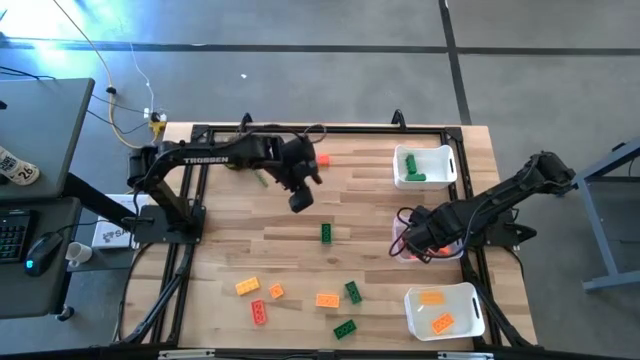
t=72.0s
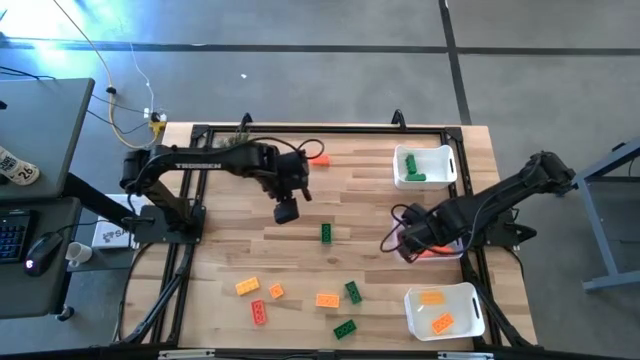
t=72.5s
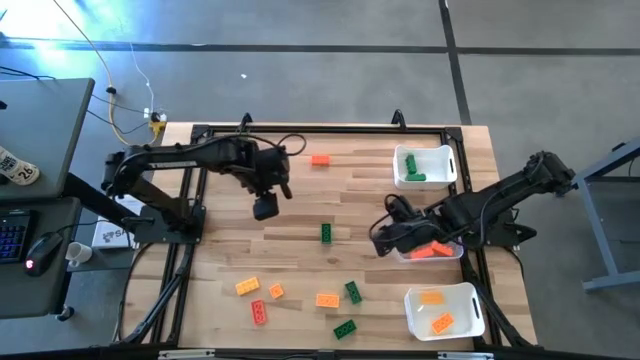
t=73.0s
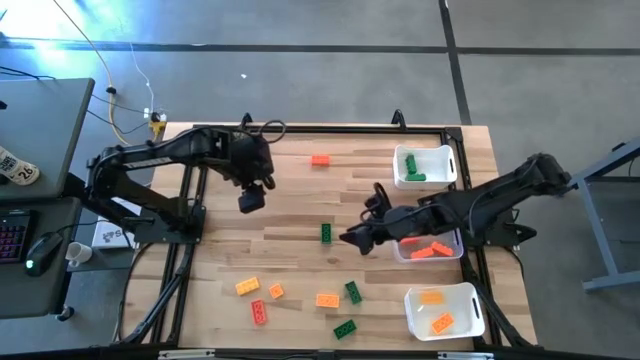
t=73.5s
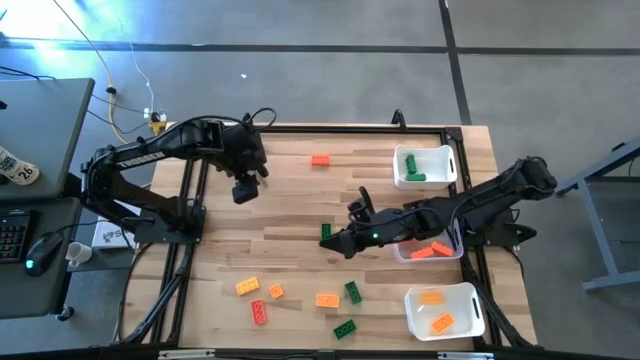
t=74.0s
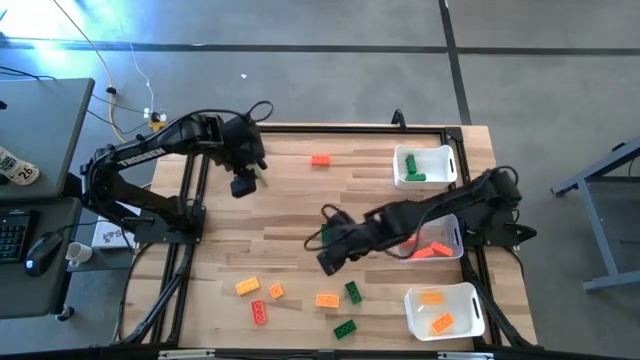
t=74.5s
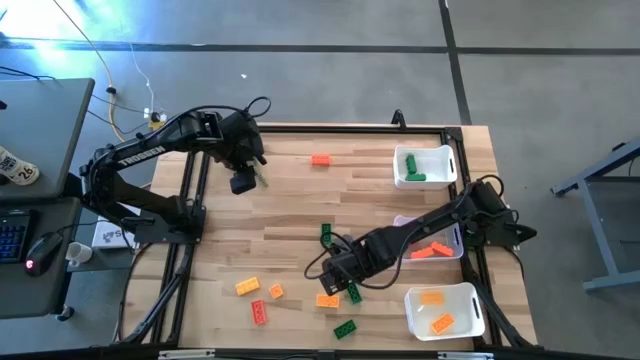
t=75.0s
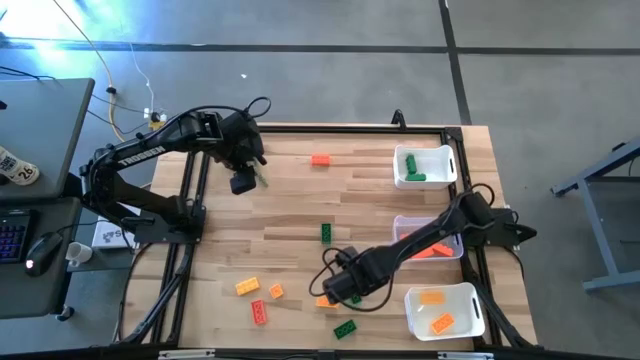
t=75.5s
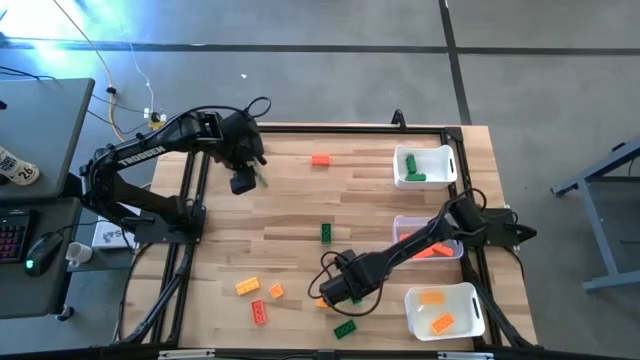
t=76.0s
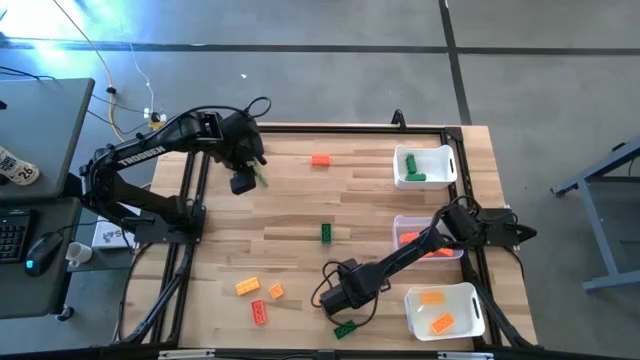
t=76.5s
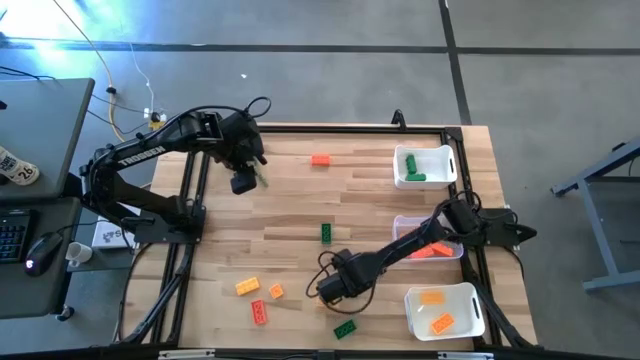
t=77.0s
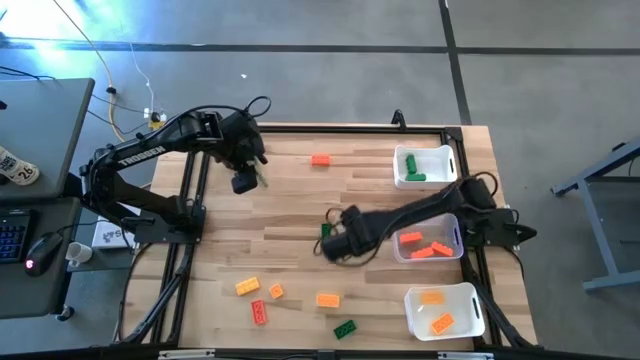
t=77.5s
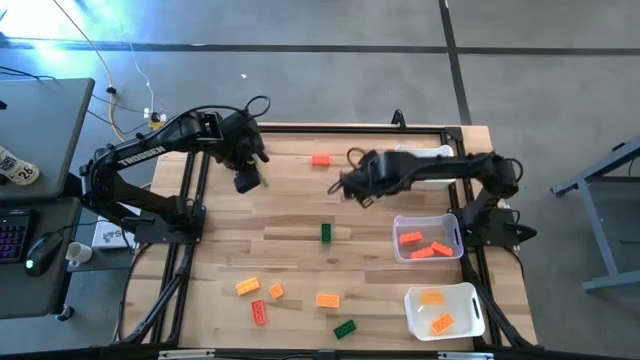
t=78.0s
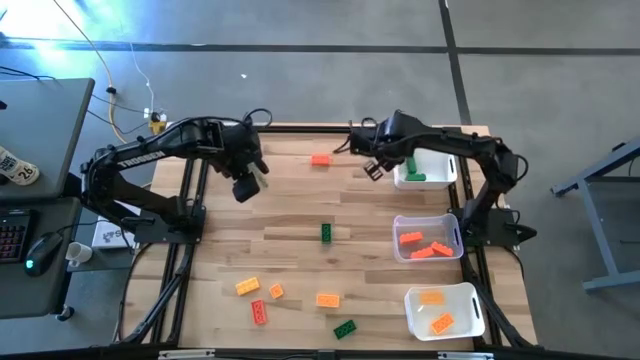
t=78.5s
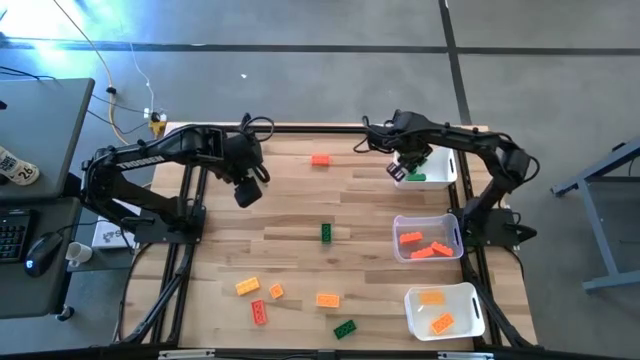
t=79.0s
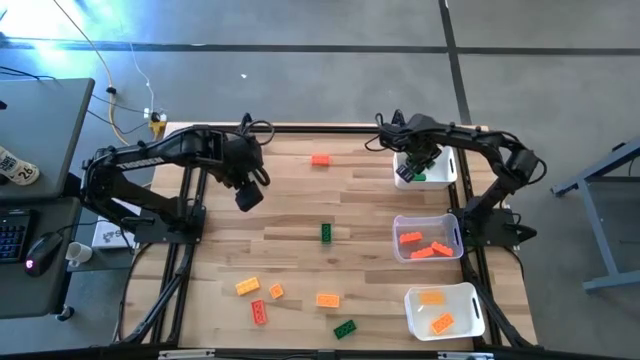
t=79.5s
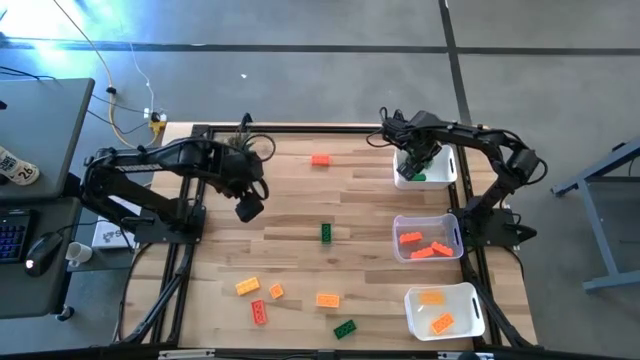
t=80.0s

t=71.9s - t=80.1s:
Task: Sort & place blocks by color
Put the green game piece into the top white bin

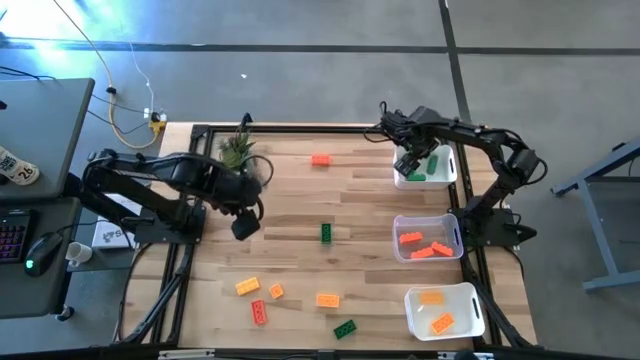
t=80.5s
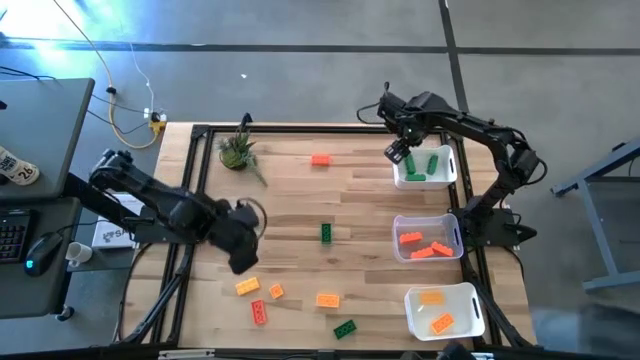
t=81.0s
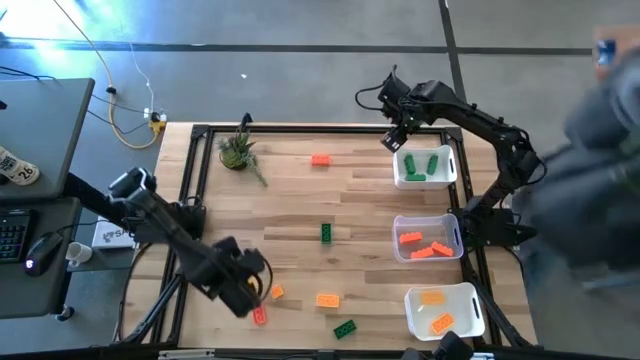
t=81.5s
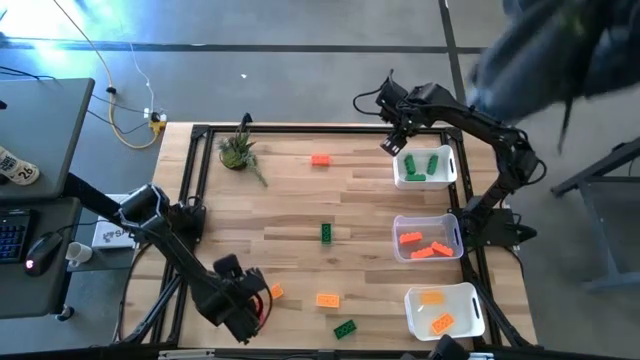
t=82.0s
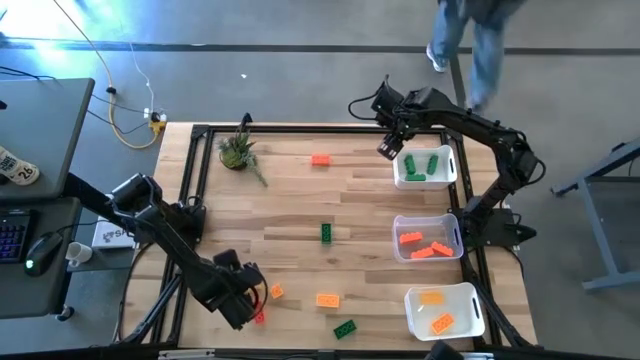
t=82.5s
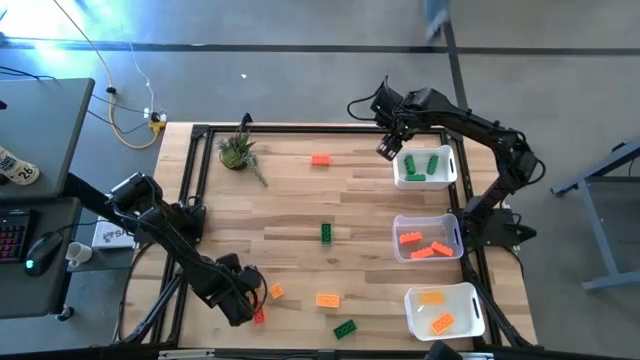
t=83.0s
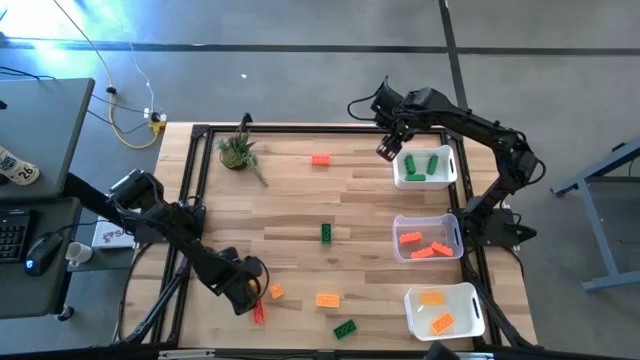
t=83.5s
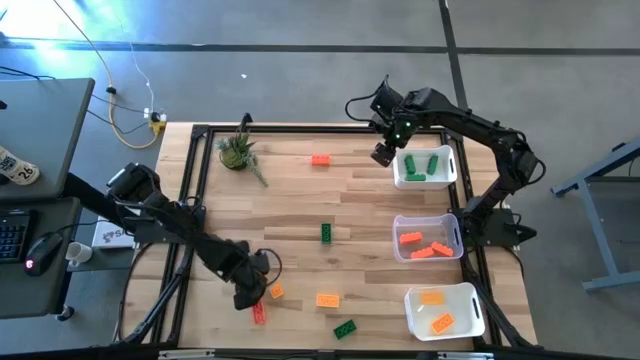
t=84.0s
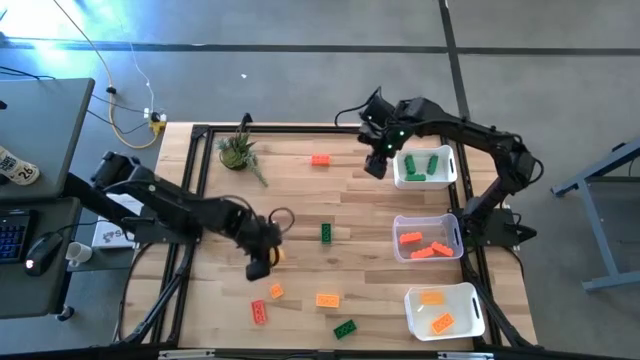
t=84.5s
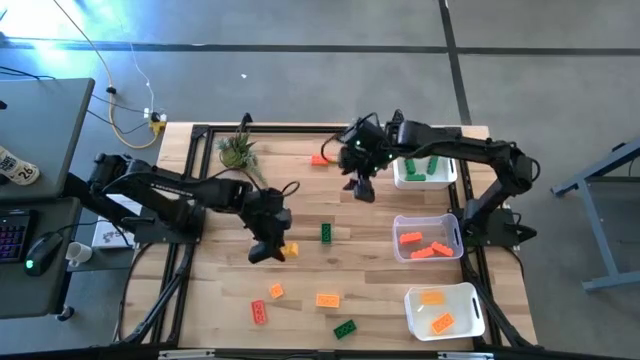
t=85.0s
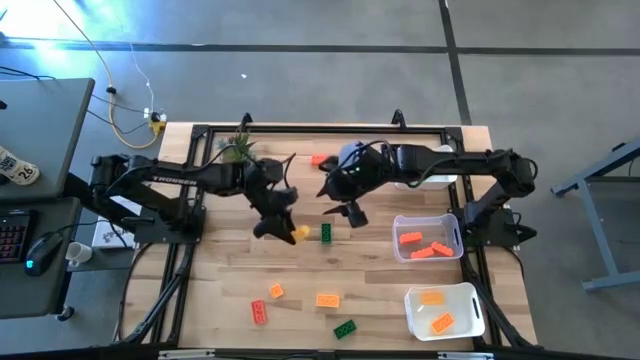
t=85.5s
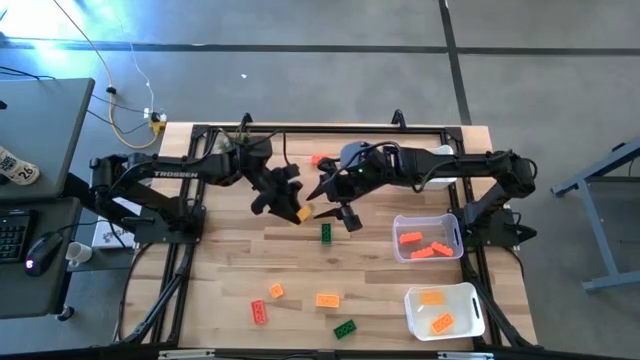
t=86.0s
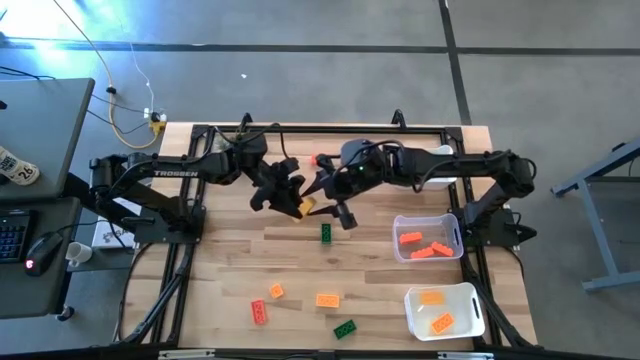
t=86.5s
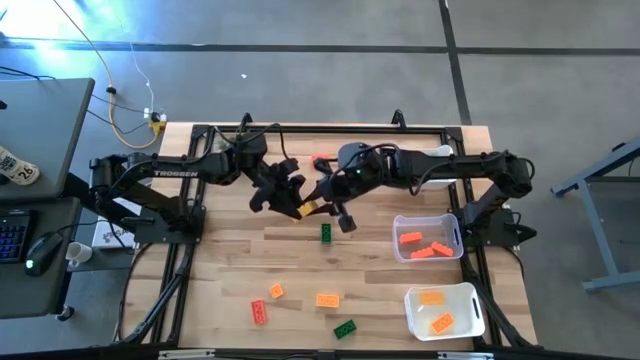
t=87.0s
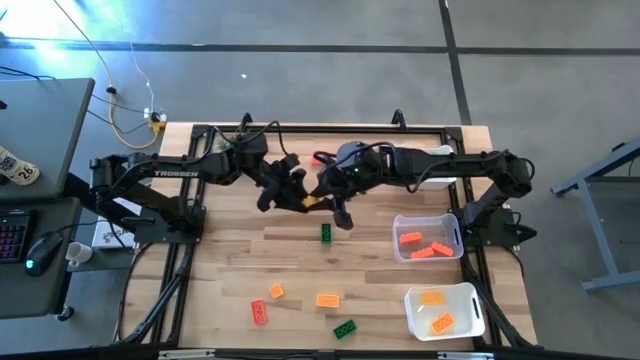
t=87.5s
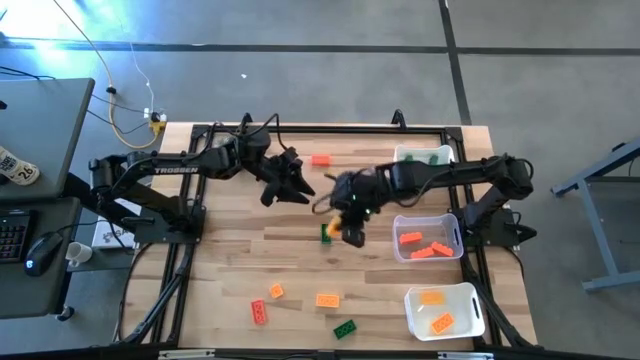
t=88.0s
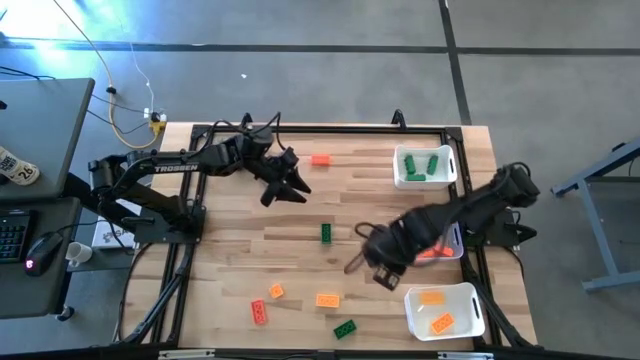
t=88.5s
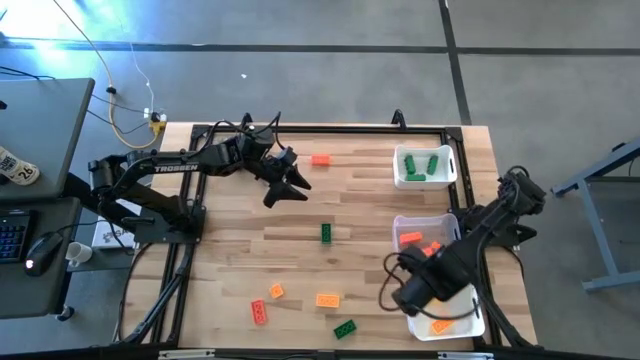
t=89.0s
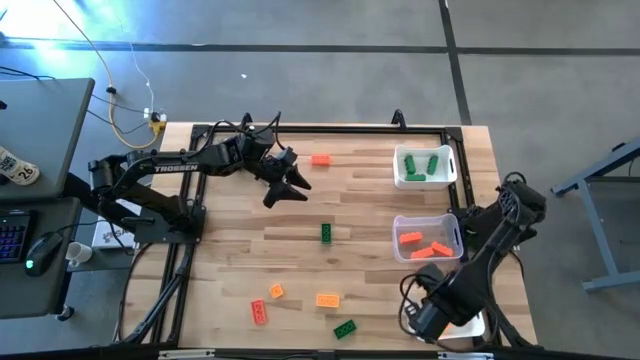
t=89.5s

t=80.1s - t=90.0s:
Put the yellow game piece into the bottom white bin

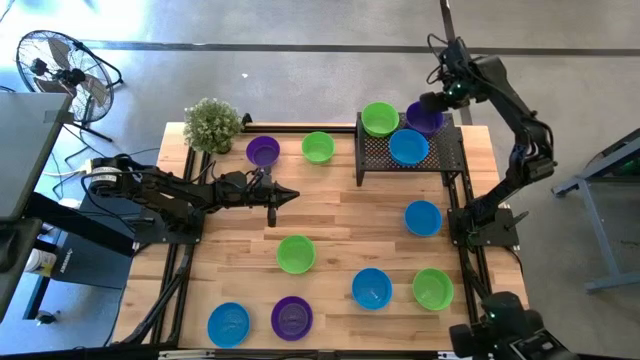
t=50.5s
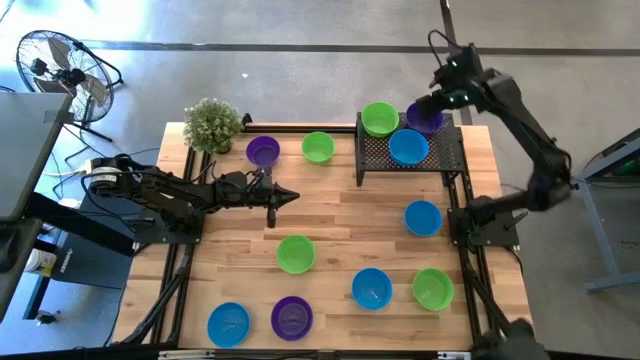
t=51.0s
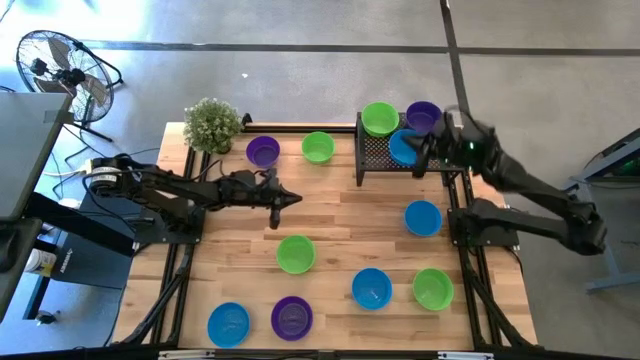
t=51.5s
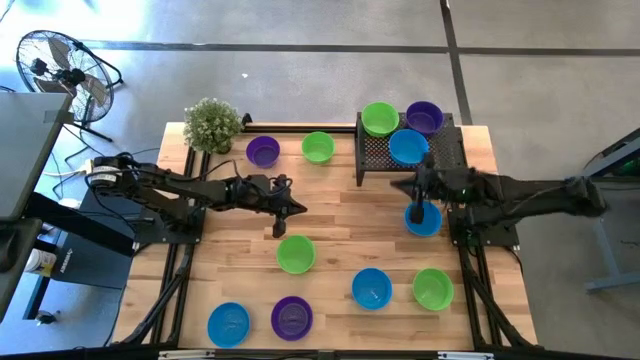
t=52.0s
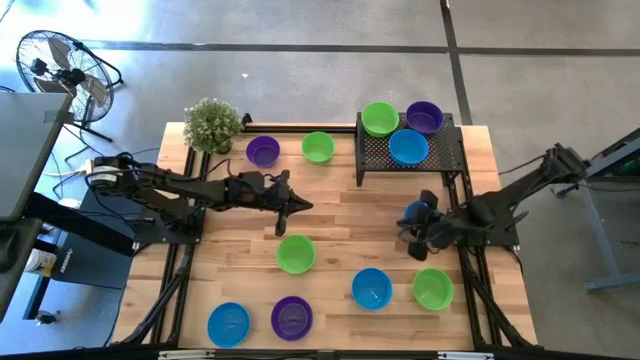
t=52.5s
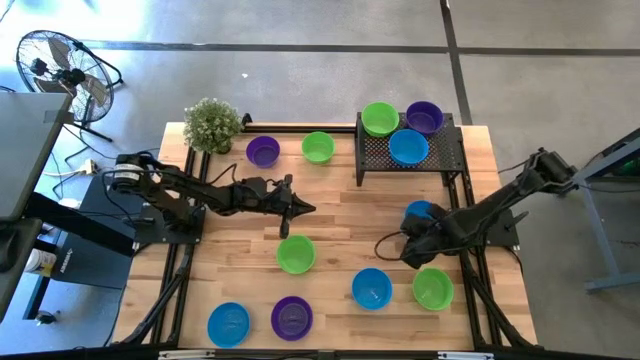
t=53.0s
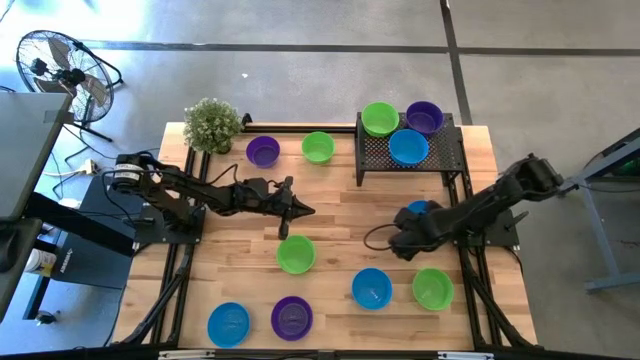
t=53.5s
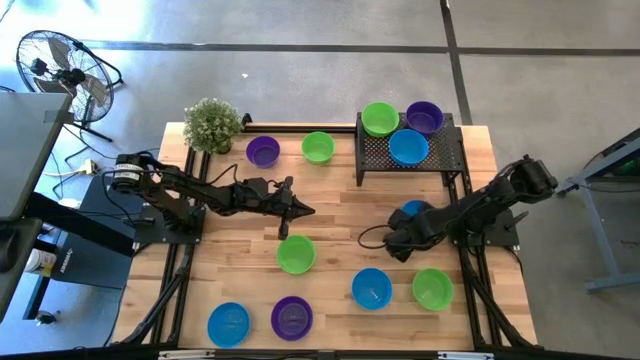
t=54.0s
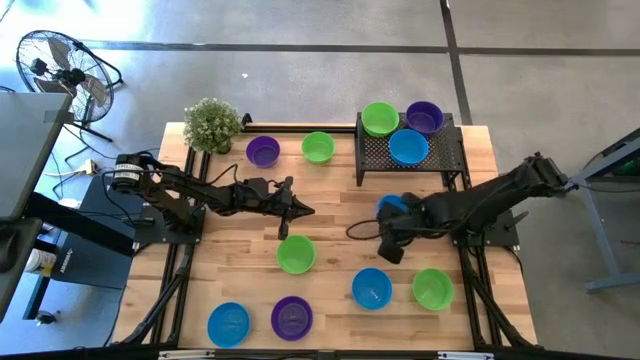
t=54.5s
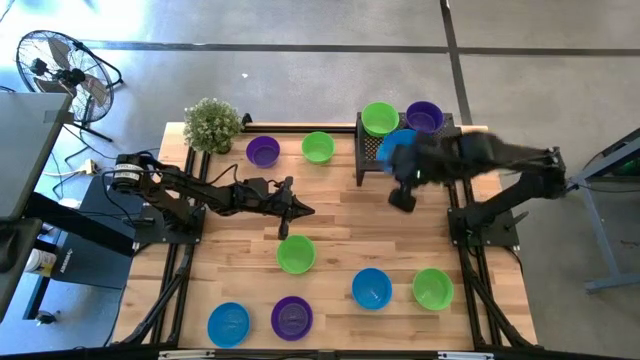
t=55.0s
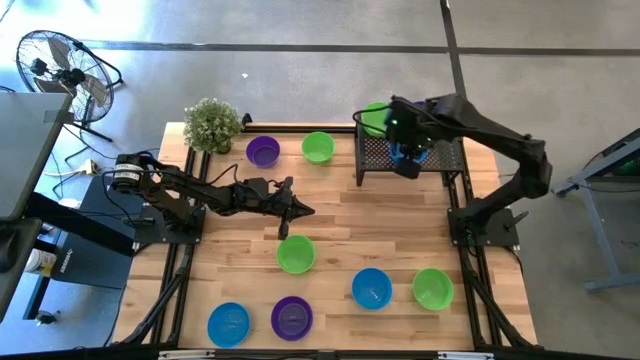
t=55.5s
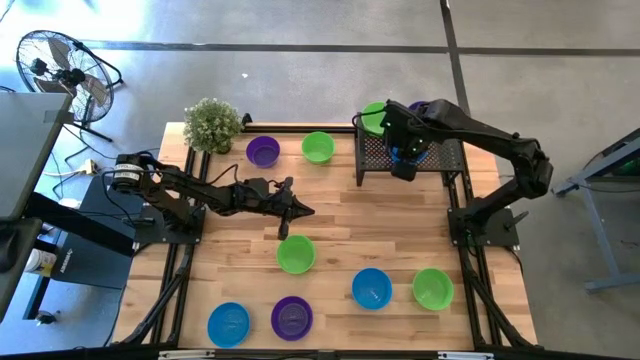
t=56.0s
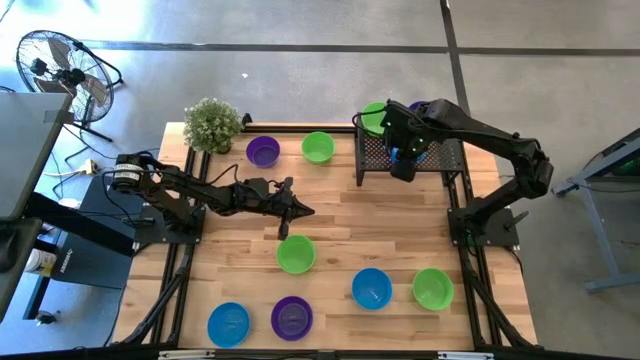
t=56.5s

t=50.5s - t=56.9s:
Task: Pick & Place Mini bowls
Stack the blue bowl on the other blue bowl on the shelf
